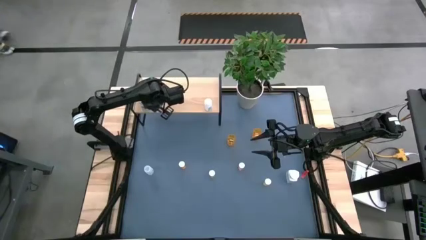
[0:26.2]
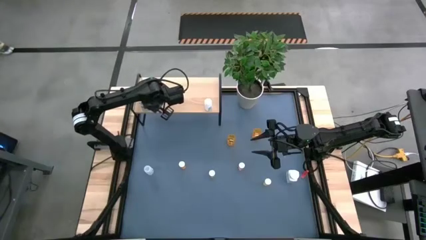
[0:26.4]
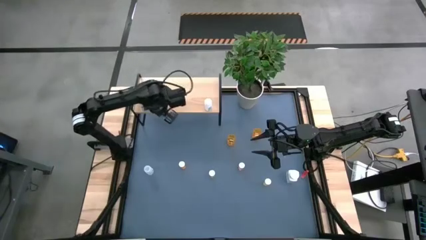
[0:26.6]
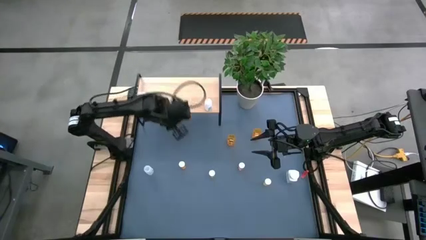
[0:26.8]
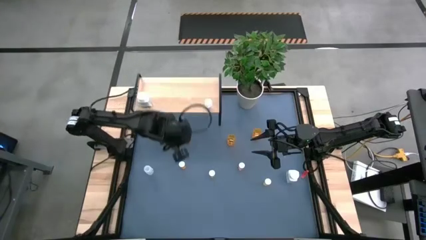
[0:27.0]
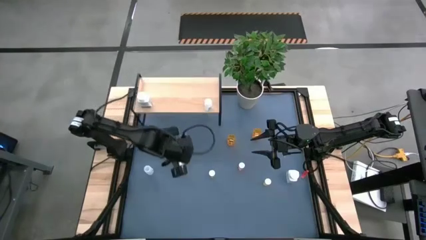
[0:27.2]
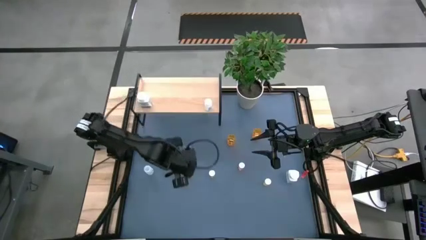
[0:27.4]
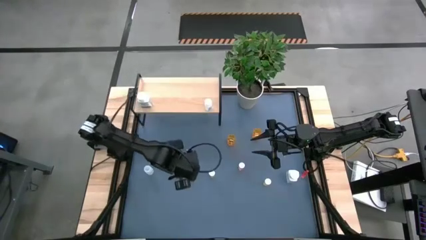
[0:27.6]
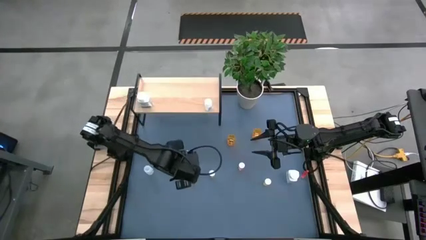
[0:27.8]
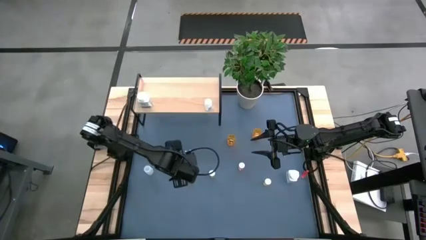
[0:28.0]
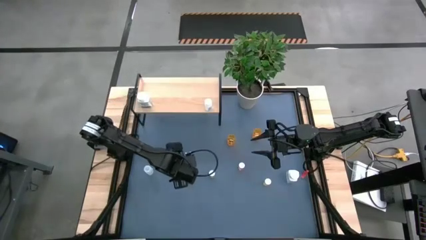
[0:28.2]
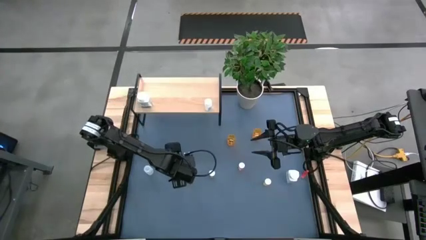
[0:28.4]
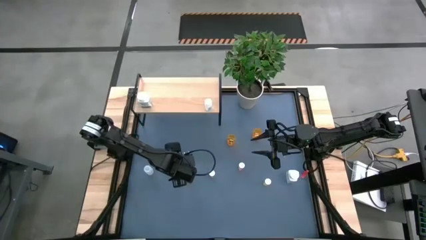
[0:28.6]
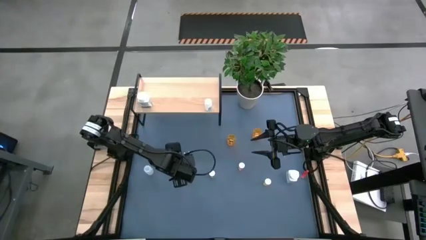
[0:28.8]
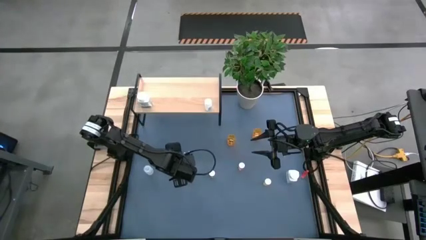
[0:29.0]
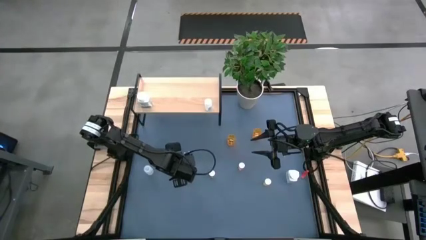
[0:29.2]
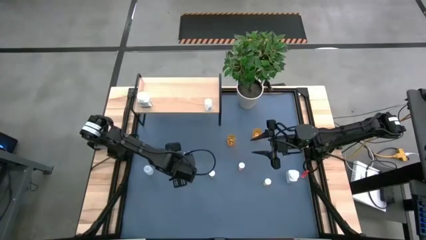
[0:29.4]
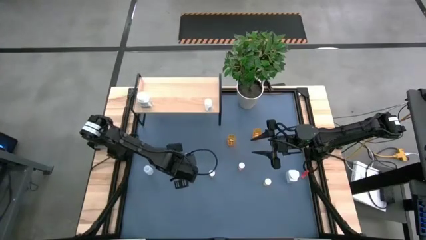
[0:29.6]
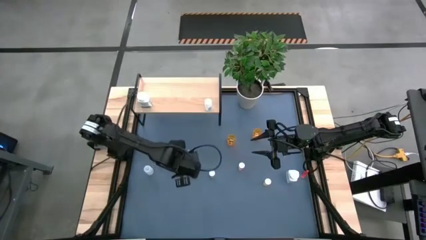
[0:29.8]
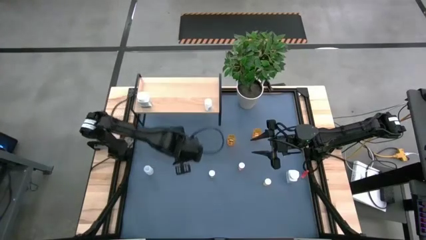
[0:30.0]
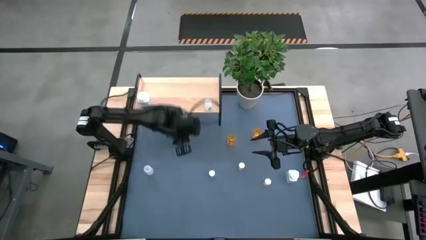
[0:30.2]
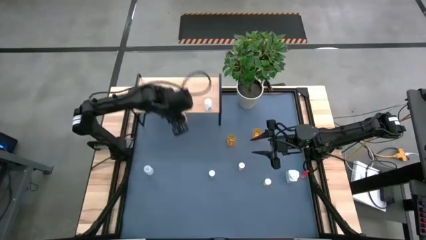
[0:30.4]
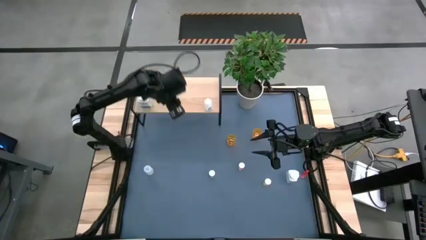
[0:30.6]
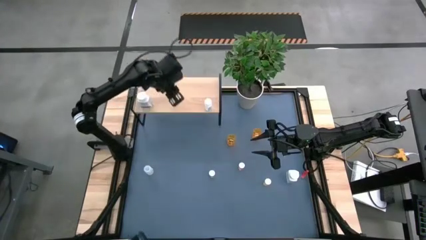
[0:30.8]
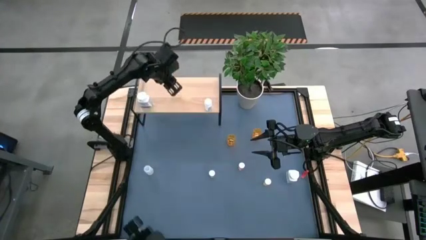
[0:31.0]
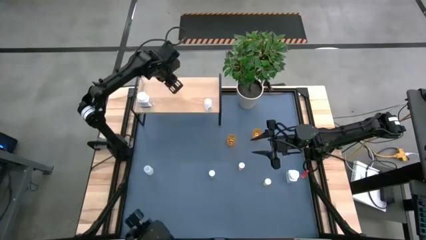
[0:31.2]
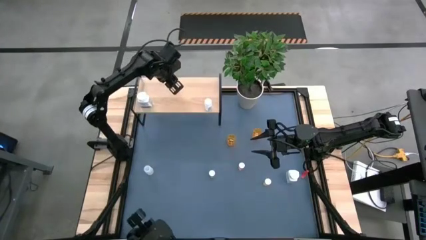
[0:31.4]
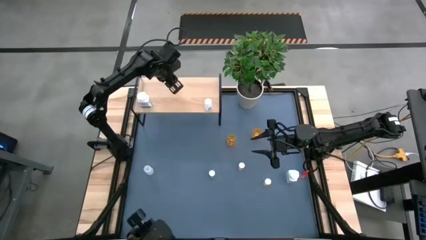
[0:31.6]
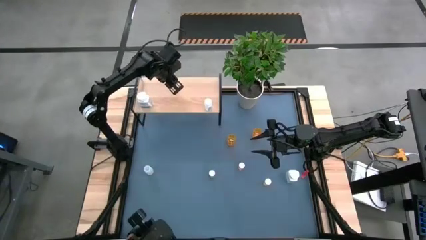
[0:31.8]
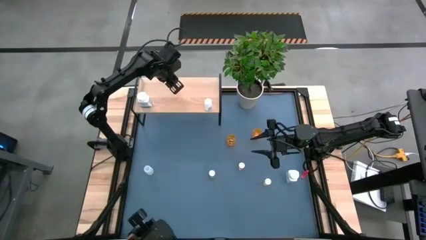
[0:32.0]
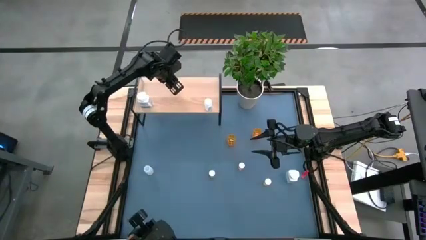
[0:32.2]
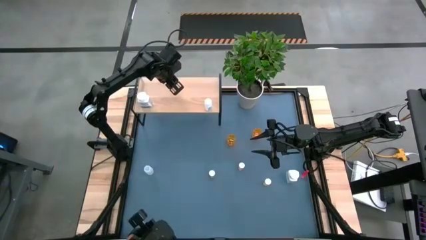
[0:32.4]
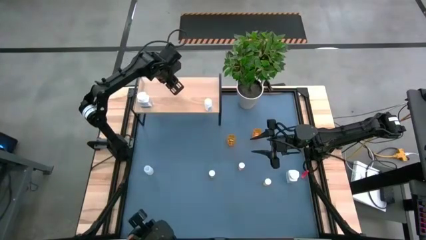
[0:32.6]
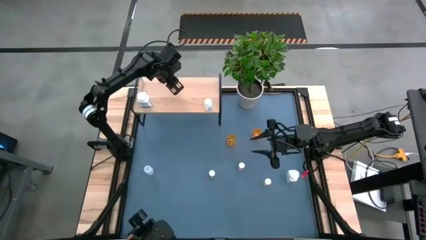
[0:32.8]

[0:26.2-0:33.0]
Task: Pick and place medicine bottles onto shelf by color
Put the small orange pill bottle on the shelf

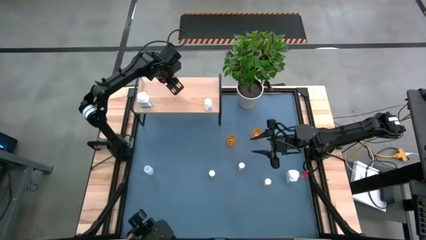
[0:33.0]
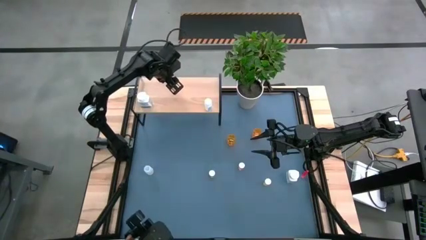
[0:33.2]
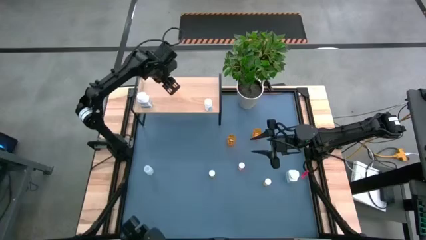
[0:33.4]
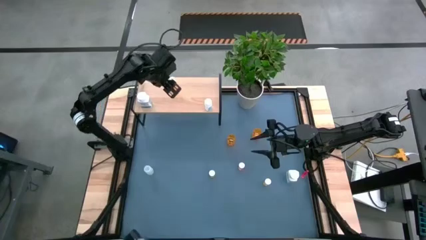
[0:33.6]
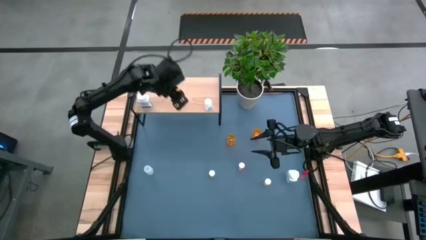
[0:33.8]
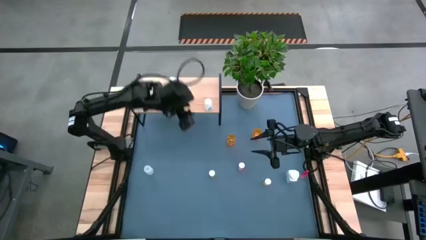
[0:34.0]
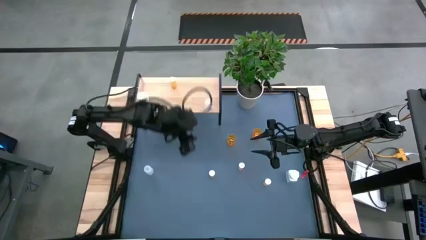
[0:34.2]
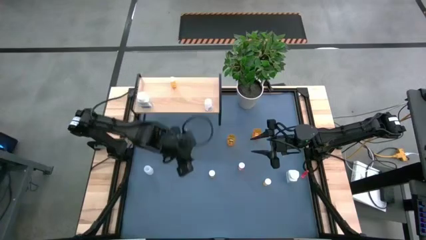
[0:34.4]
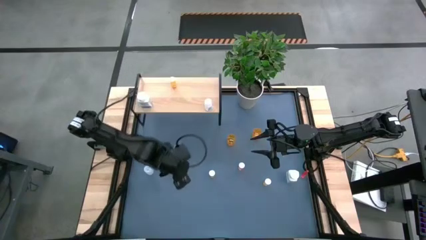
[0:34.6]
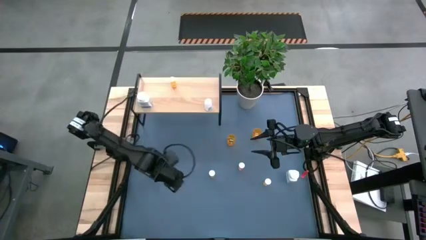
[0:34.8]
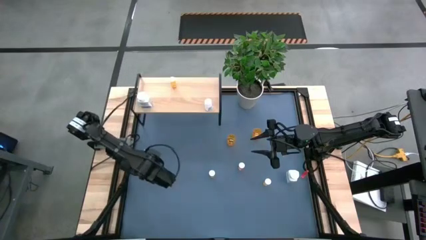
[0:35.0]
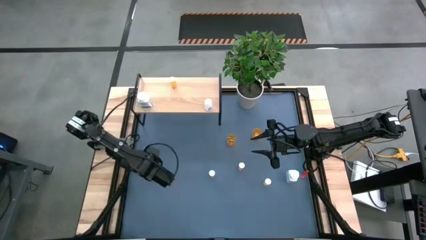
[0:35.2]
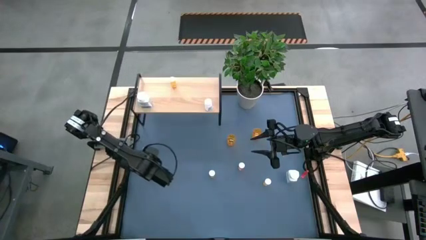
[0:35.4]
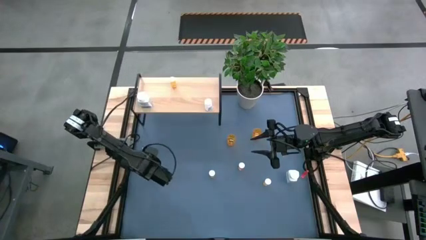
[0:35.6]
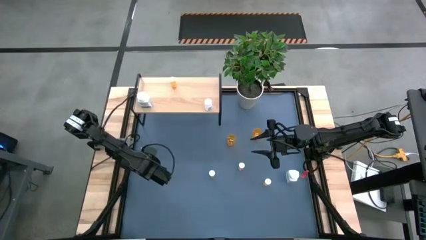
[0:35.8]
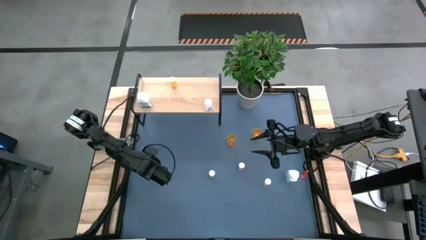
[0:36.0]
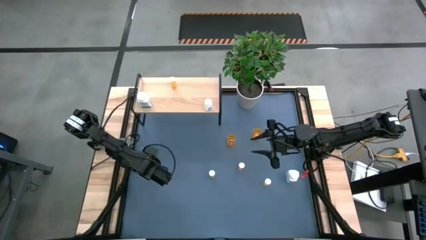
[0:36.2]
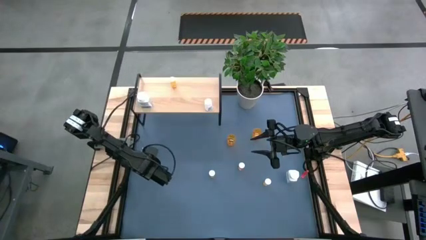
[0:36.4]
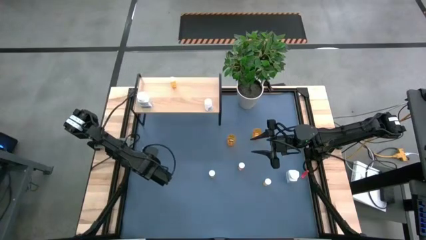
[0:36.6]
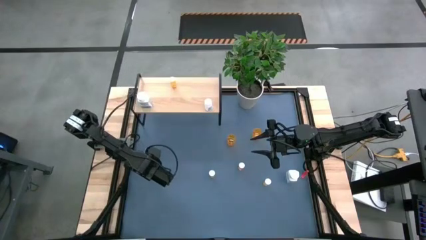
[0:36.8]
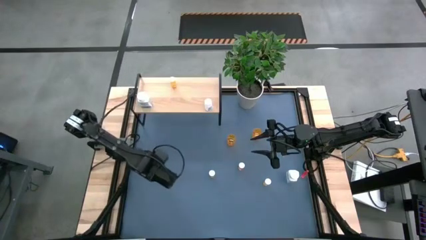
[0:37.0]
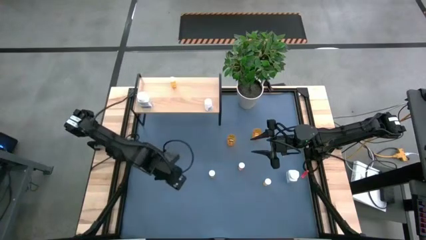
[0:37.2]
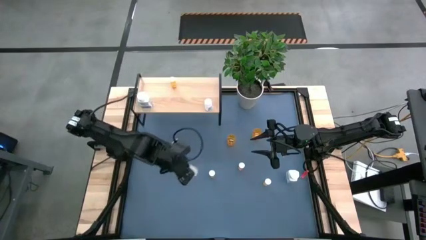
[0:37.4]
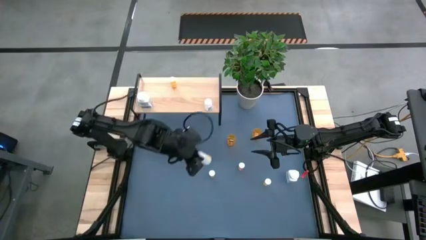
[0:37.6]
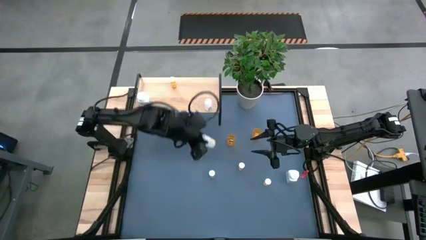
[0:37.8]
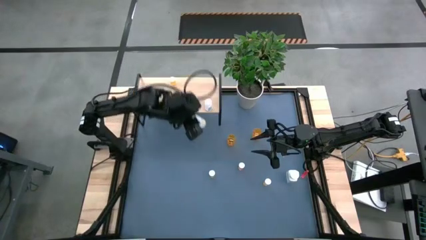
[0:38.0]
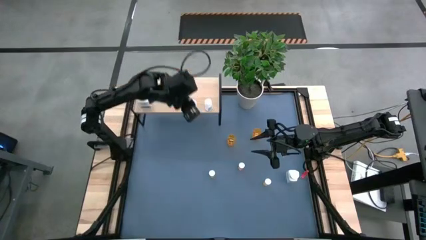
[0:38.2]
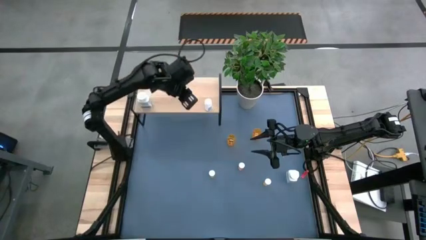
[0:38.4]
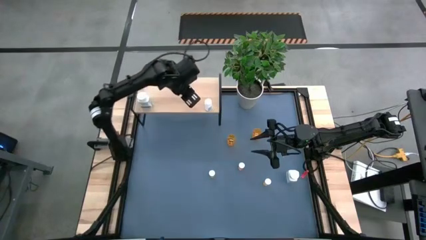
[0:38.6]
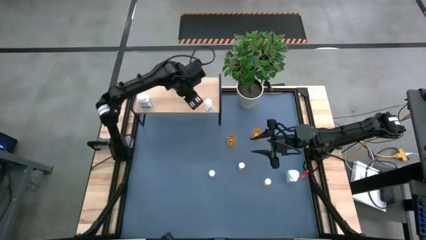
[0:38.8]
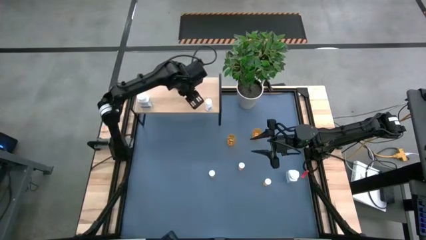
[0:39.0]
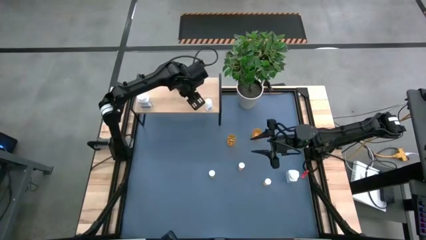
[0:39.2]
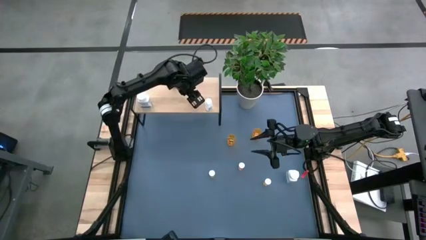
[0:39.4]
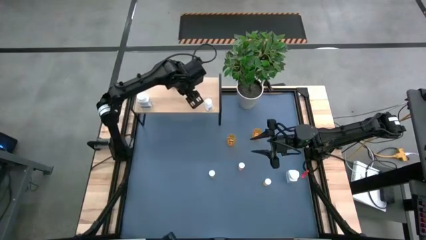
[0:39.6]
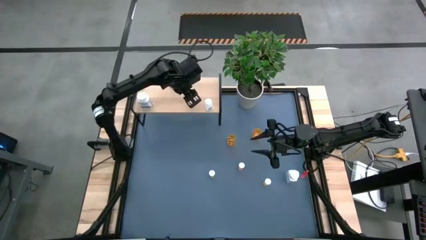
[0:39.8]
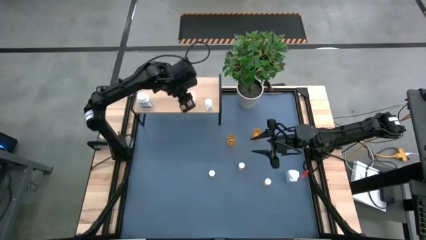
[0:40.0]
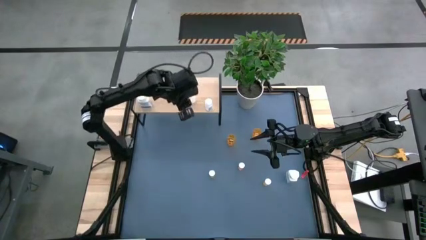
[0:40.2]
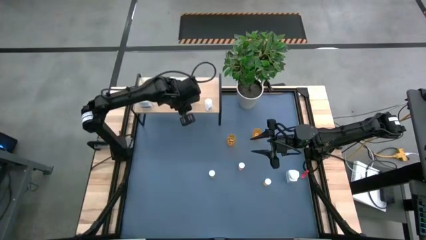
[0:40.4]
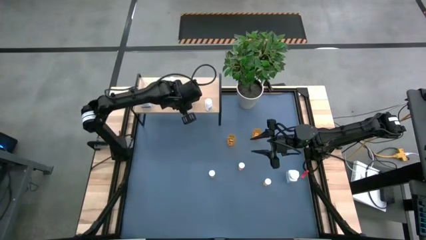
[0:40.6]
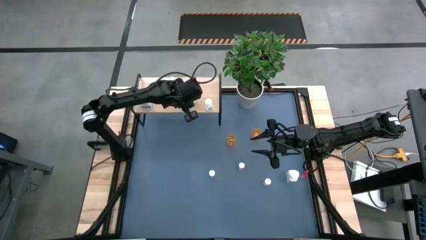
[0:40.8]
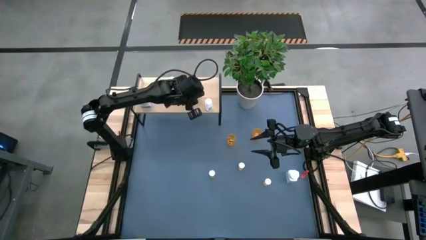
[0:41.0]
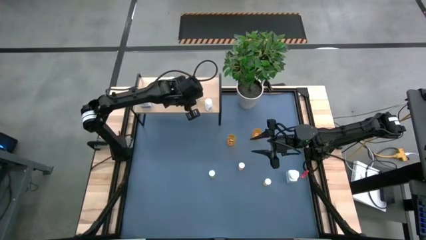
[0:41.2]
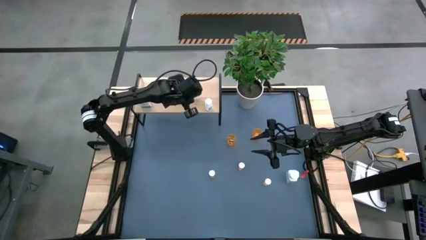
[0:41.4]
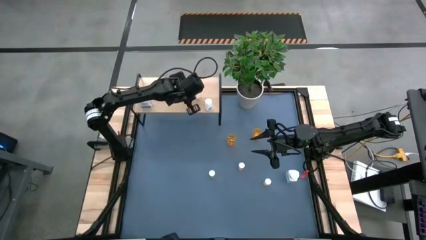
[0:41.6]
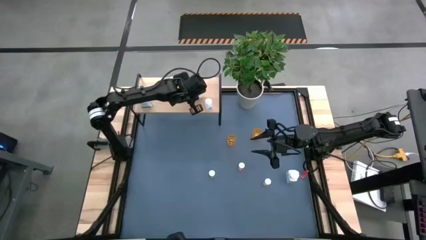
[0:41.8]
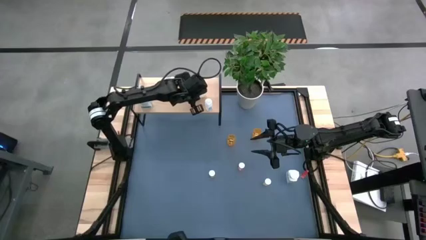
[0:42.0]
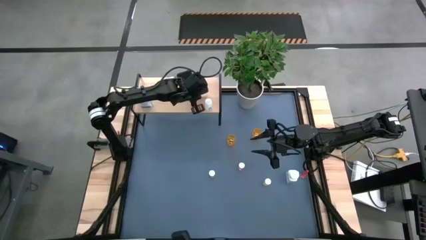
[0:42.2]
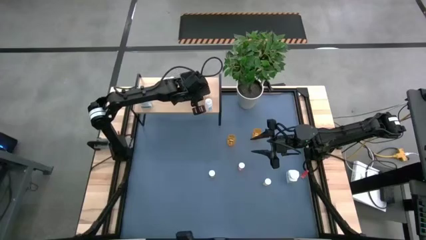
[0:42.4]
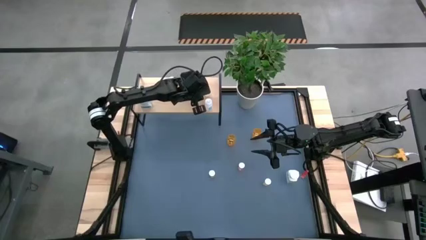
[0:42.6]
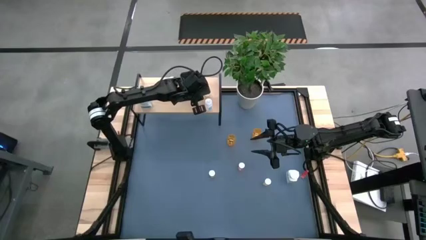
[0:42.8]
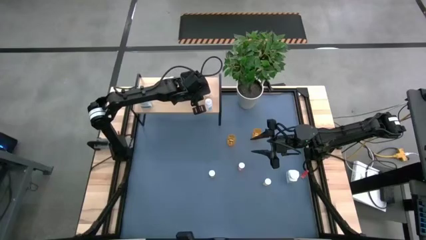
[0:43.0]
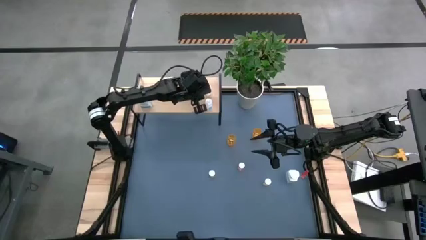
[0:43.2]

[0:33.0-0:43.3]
Put the transparent pill bottle on the shelf
